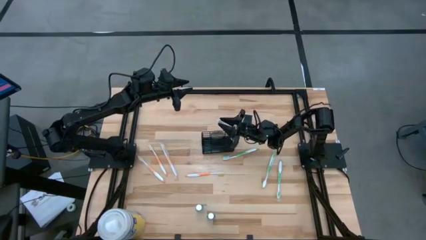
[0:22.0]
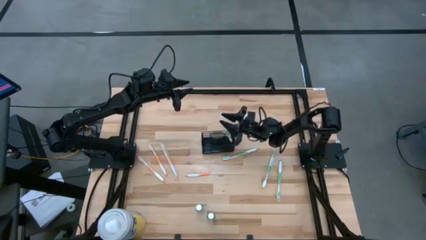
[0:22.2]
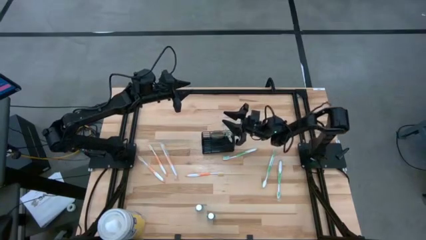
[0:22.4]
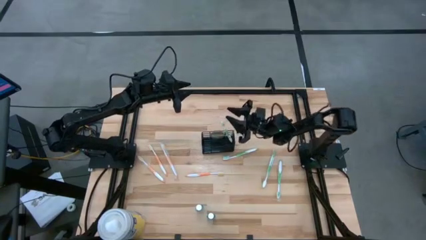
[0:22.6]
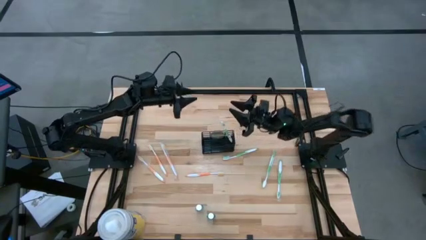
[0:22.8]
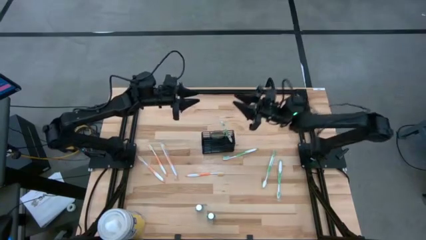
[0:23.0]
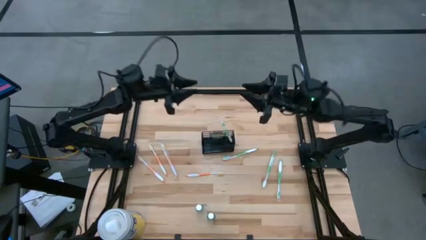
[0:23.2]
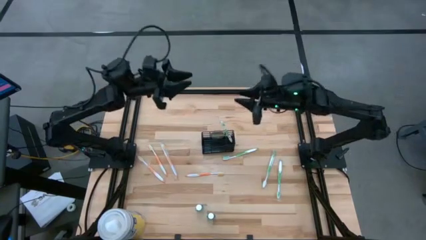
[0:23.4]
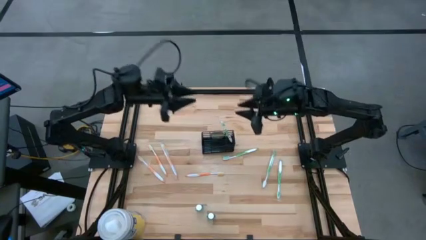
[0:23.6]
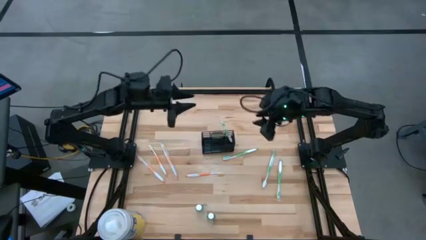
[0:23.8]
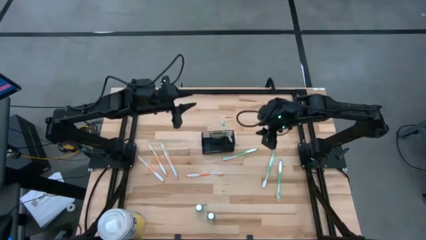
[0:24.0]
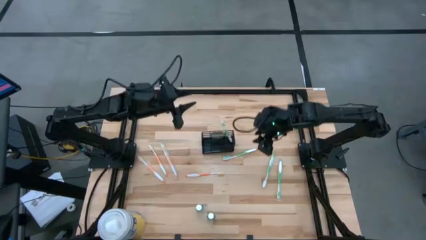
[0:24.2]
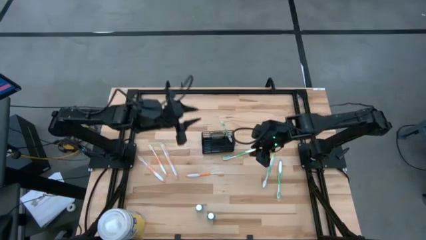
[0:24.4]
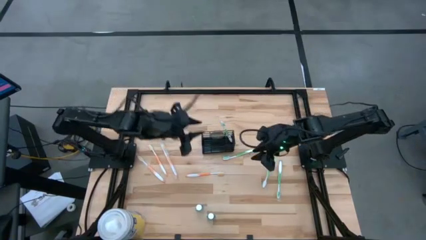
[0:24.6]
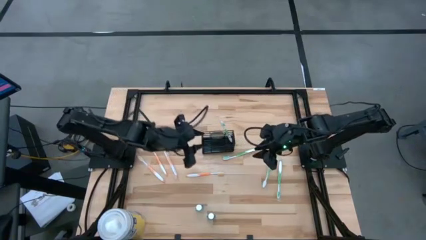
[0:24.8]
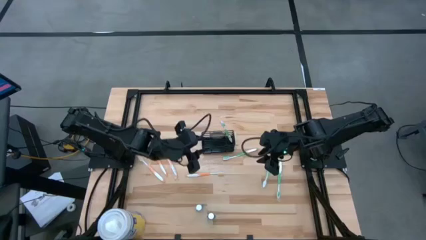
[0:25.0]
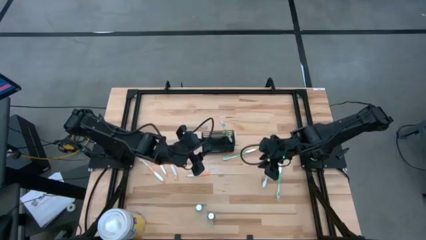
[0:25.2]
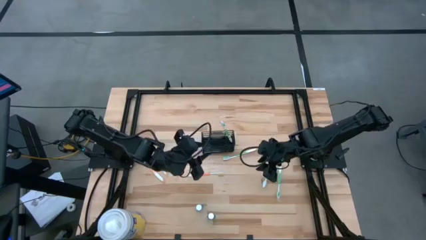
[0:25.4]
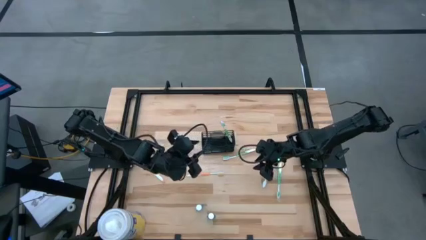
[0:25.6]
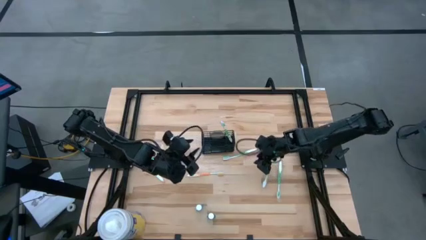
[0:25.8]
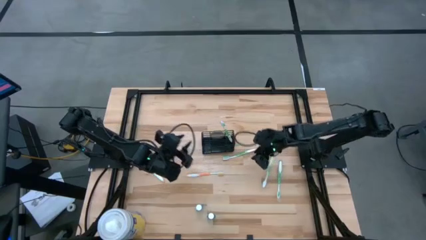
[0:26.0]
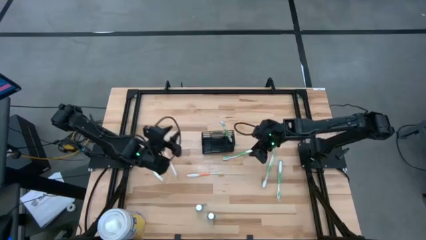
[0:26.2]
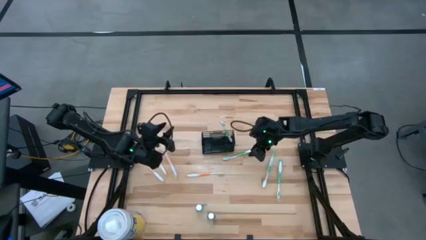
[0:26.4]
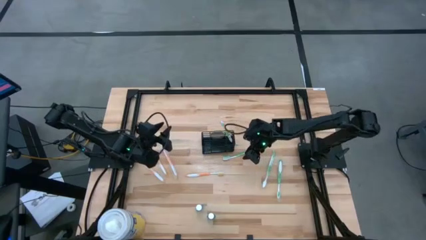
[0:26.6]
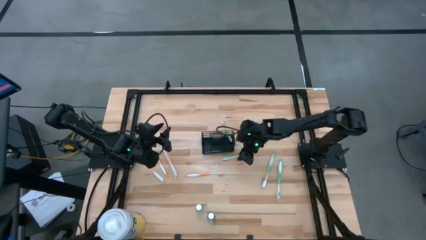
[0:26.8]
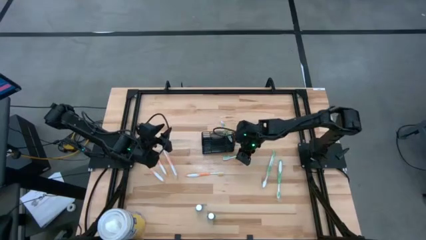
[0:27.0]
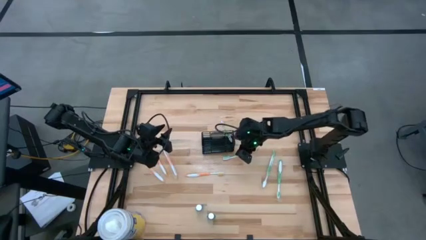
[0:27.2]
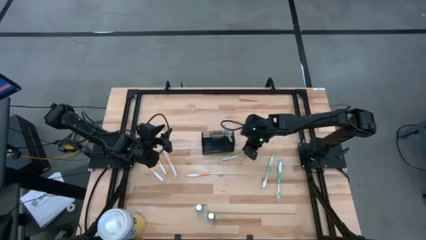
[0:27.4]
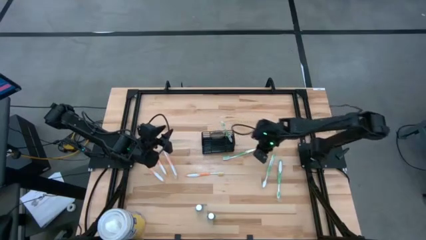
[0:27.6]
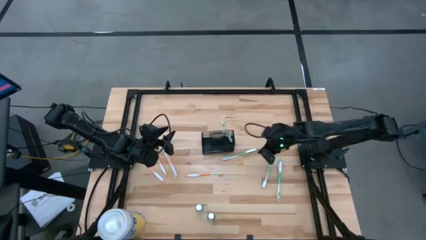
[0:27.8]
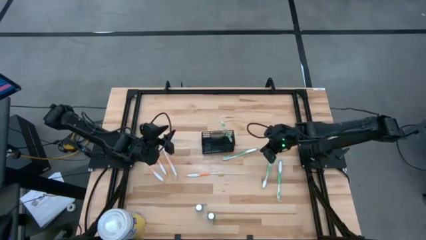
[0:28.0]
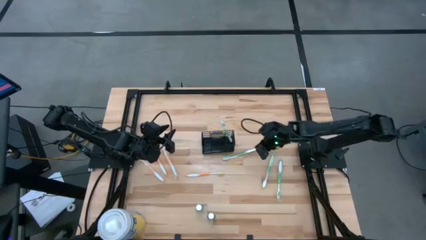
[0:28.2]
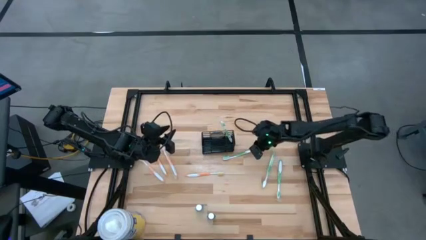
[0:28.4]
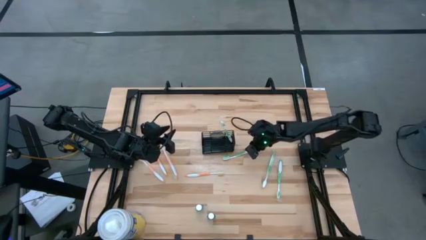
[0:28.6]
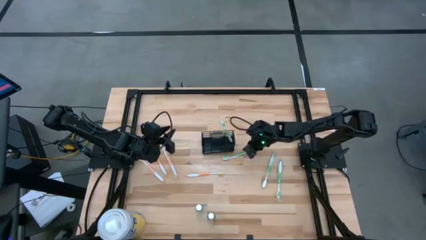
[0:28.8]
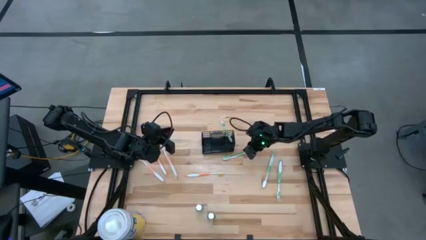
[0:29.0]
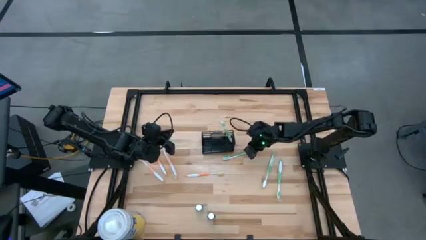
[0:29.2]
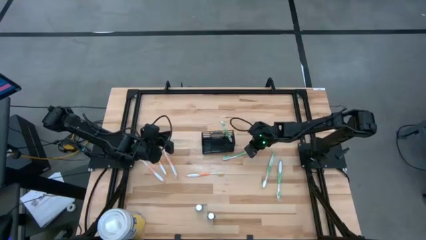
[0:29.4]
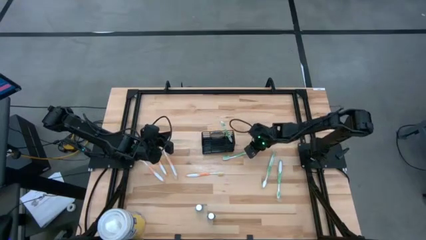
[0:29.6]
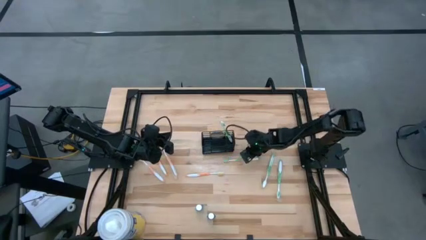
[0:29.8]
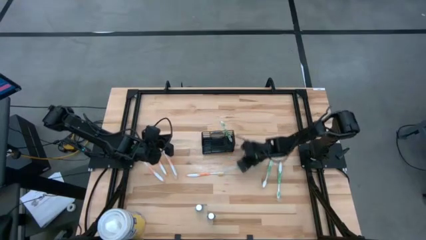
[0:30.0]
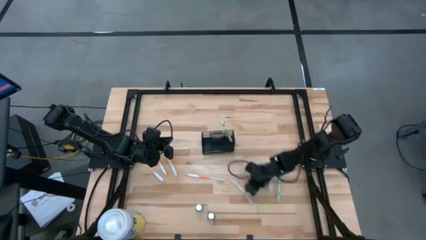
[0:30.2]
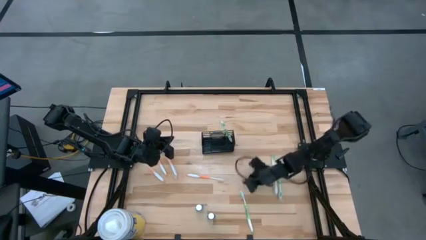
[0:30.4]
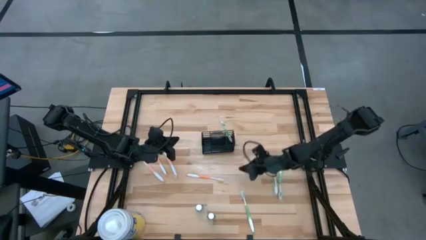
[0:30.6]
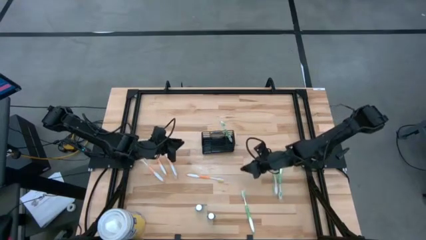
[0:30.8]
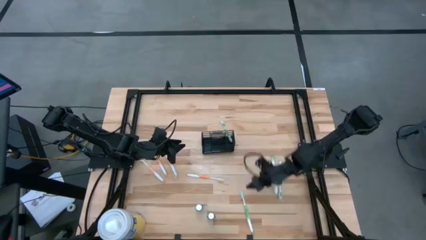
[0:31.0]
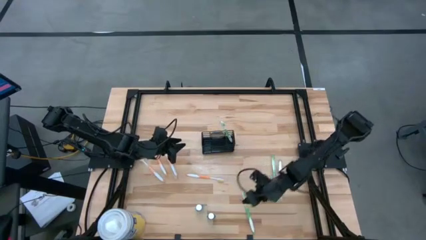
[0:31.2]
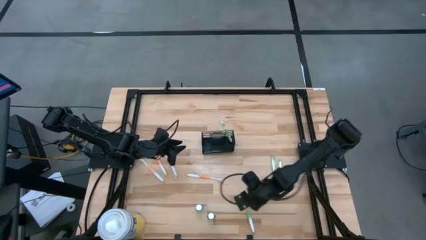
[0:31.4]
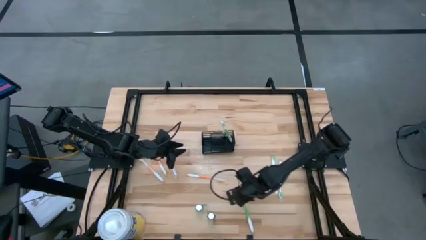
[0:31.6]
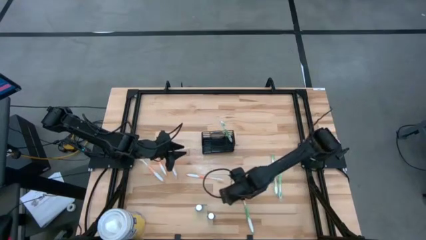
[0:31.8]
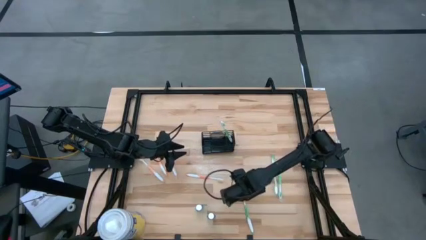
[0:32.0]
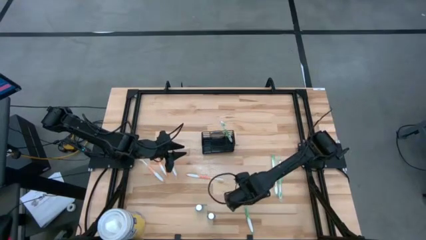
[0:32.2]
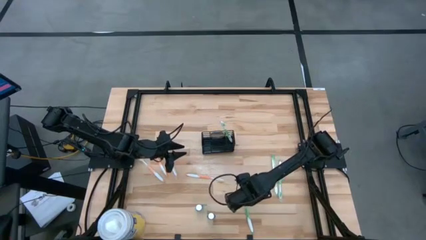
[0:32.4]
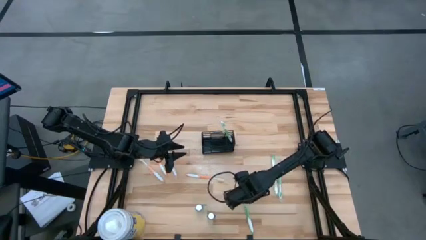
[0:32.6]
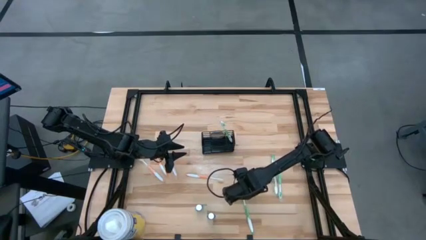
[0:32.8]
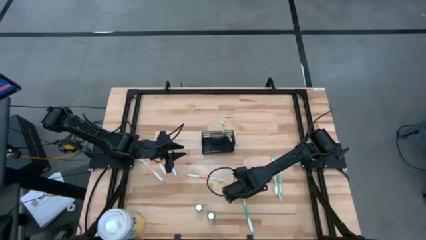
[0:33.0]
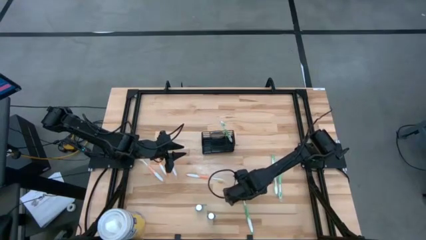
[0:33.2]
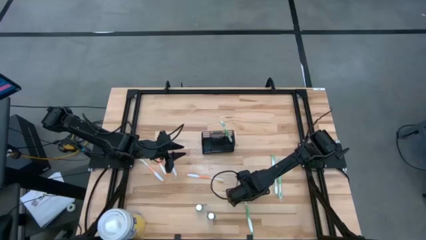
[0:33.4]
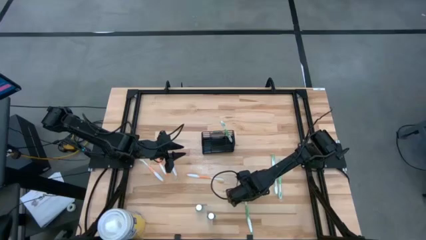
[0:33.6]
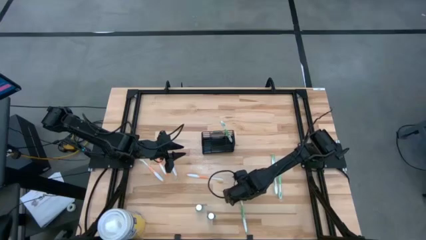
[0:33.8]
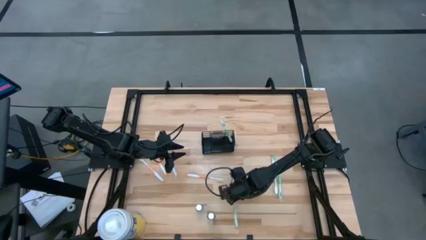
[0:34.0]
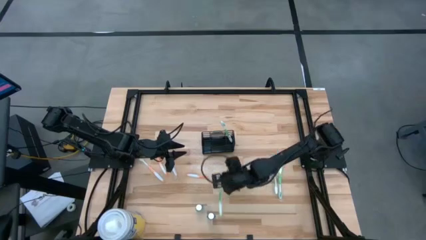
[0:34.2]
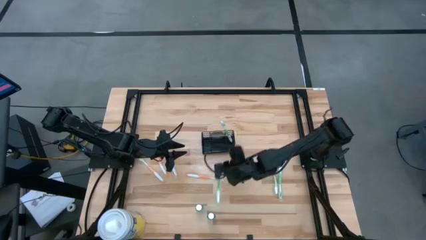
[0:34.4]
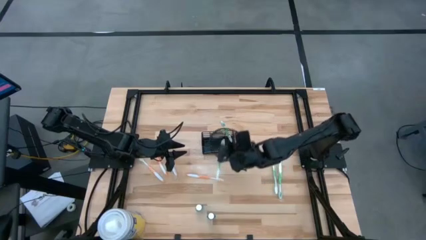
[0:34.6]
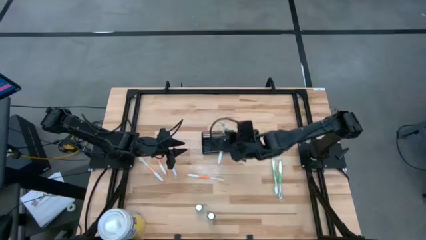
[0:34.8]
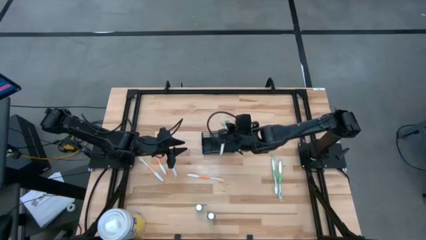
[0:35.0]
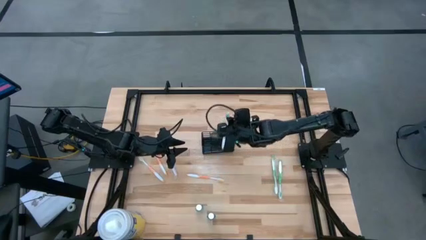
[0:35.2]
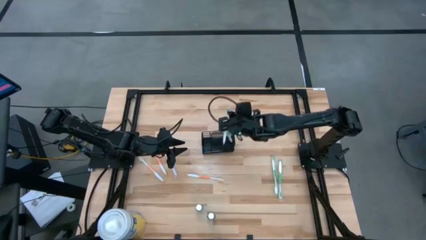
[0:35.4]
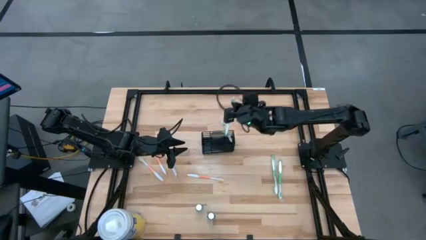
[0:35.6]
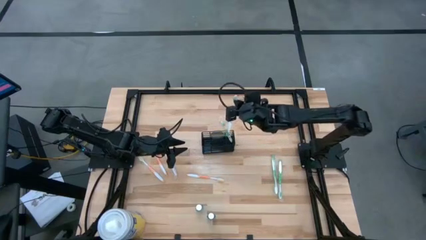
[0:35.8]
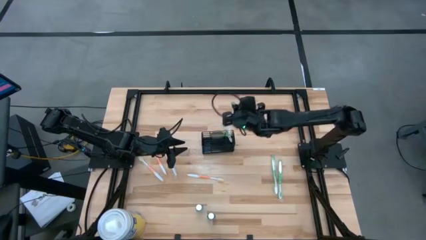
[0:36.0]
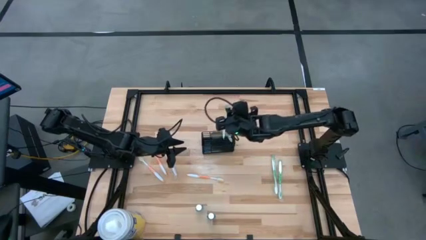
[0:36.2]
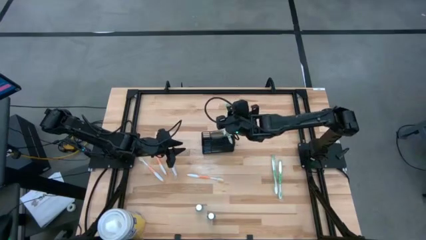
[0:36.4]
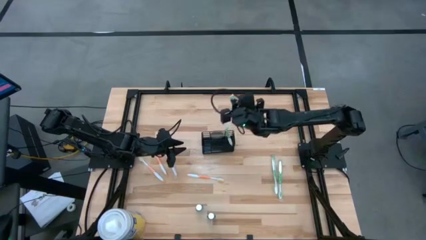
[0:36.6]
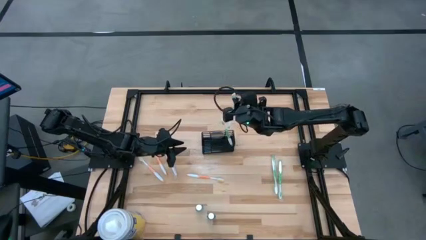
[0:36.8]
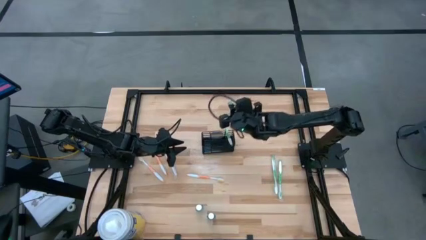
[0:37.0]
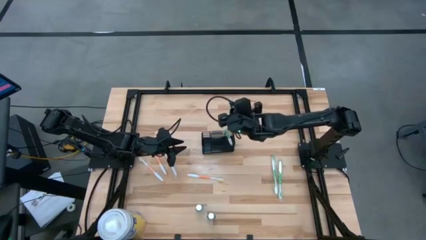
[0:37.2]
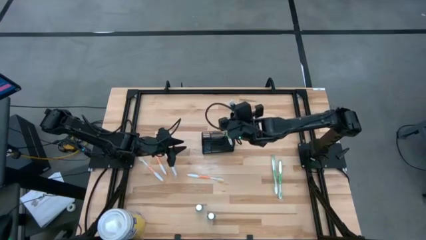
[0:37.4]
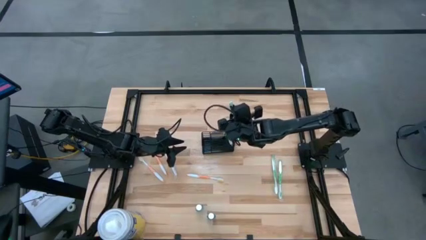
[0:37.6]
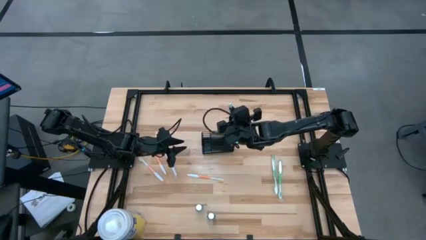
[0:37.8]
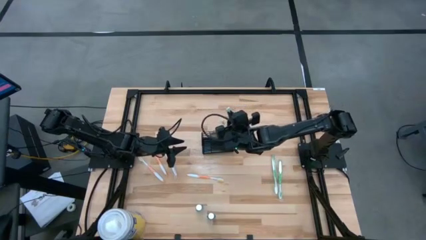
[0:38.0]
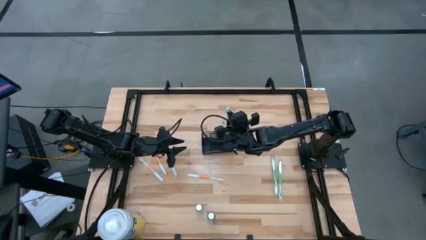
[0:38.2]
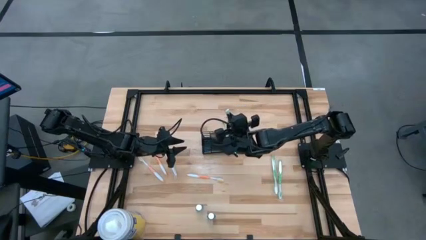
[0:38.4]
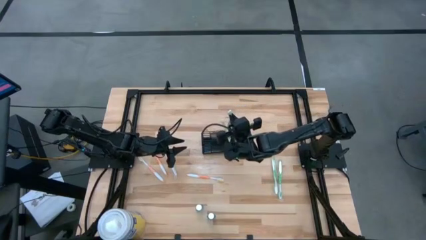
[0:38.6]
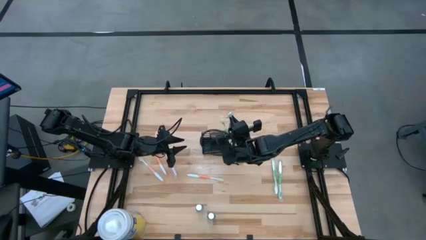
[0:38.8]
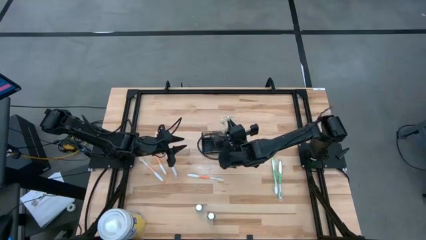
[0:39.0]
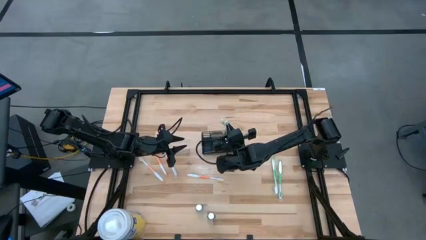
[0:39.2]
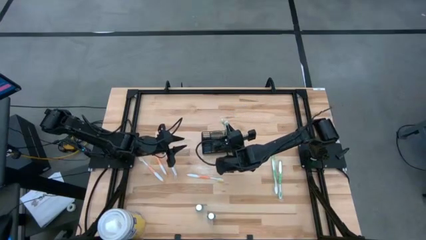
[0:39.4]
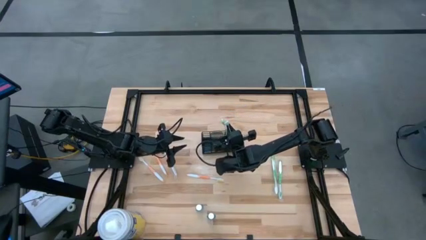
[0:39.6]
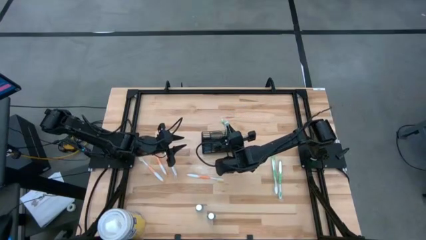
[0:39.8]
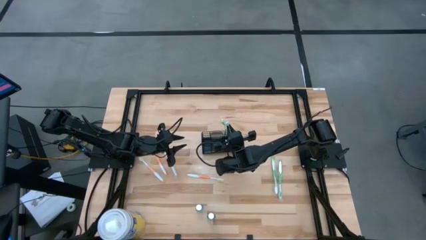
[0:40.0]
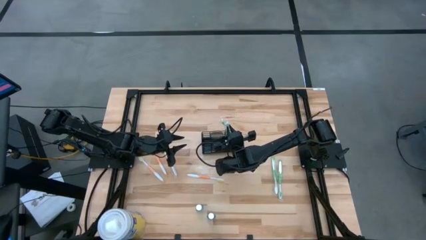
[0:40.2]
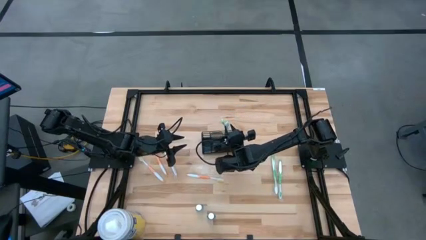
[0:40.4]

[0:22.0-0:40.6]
Task: Pick & Place toothbrushing station
Put the top green toothbrush into the wire organizer
